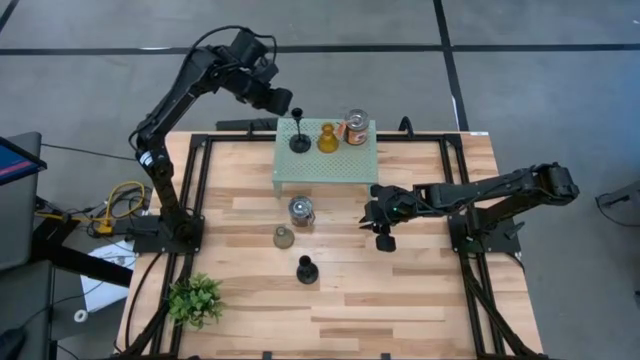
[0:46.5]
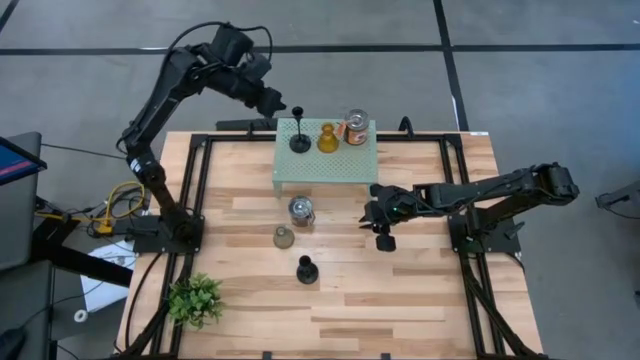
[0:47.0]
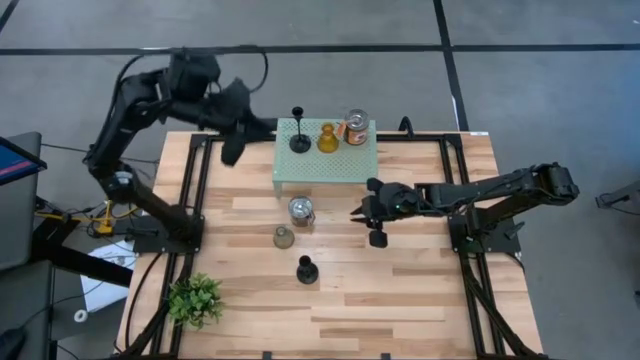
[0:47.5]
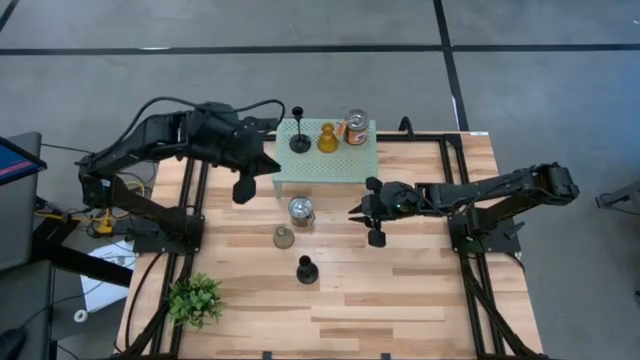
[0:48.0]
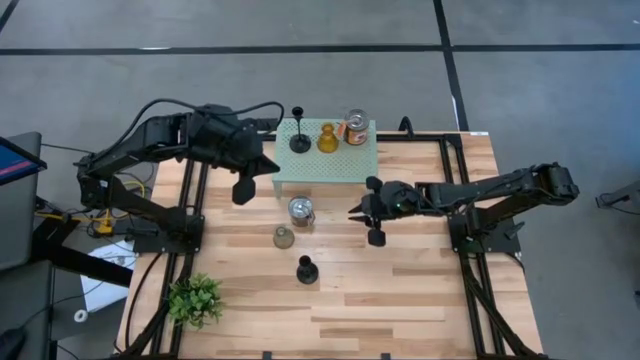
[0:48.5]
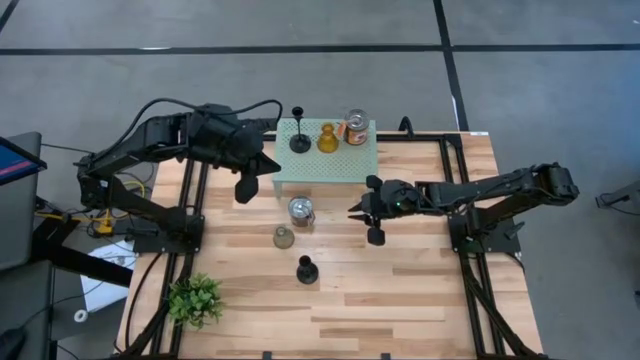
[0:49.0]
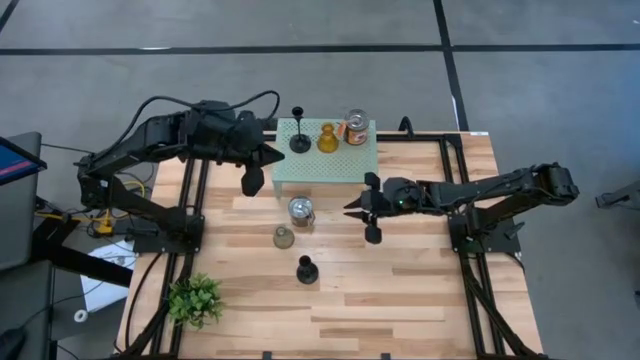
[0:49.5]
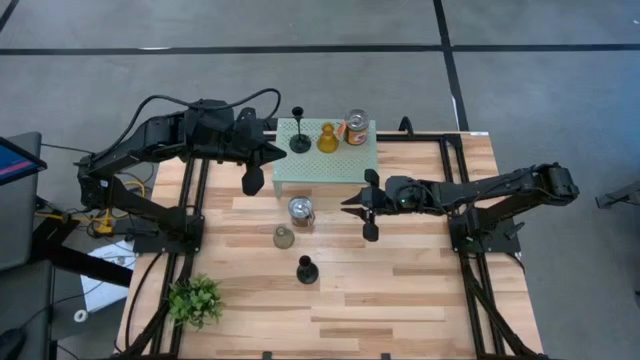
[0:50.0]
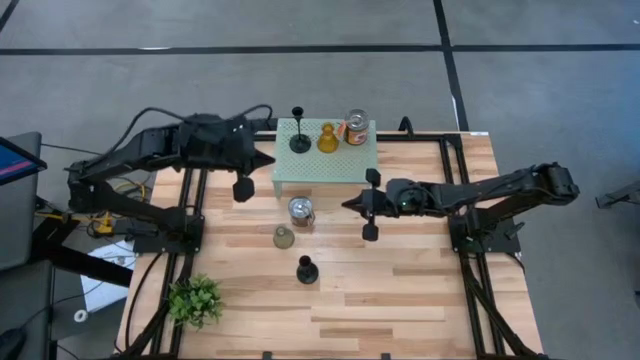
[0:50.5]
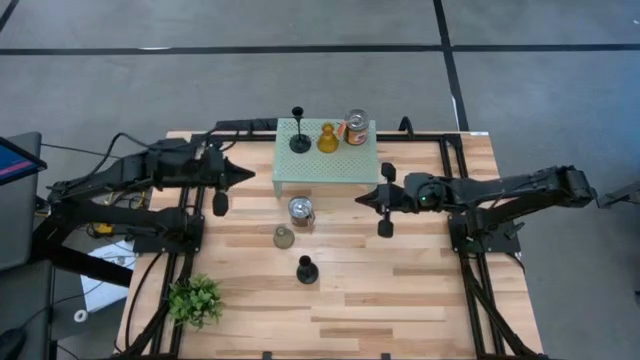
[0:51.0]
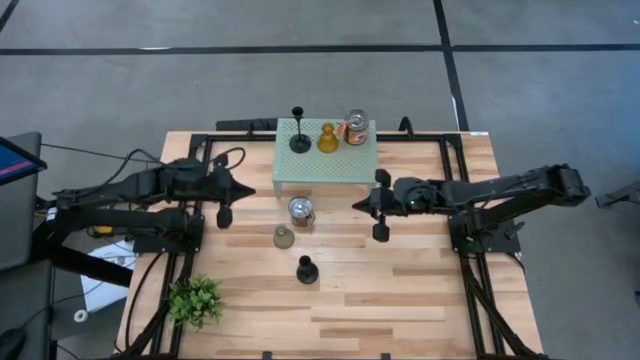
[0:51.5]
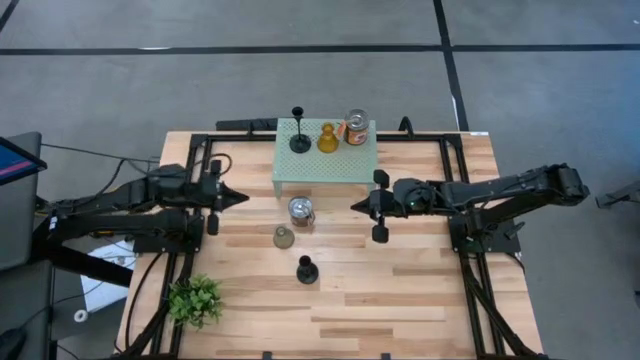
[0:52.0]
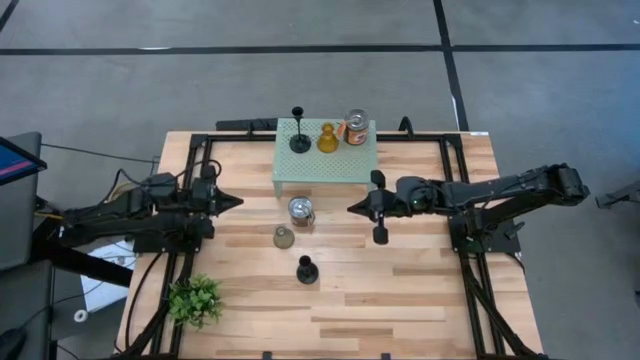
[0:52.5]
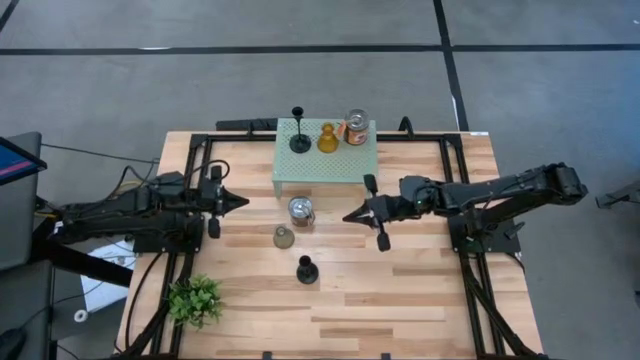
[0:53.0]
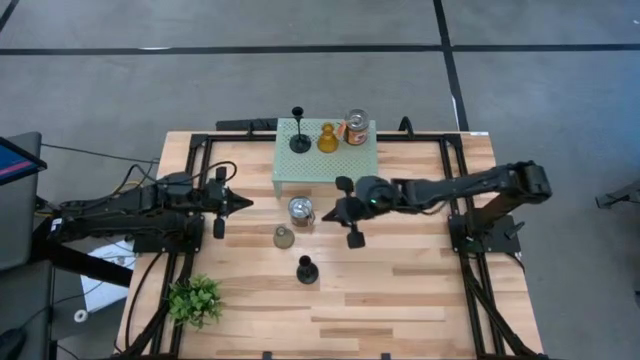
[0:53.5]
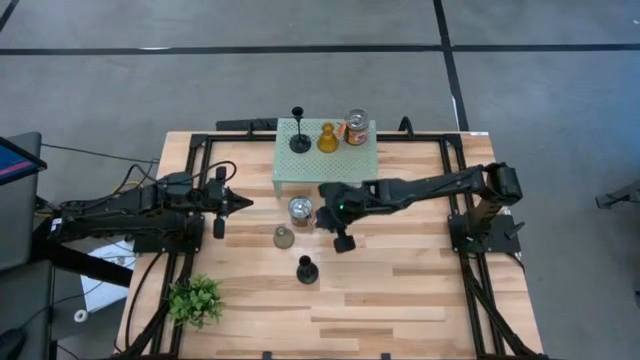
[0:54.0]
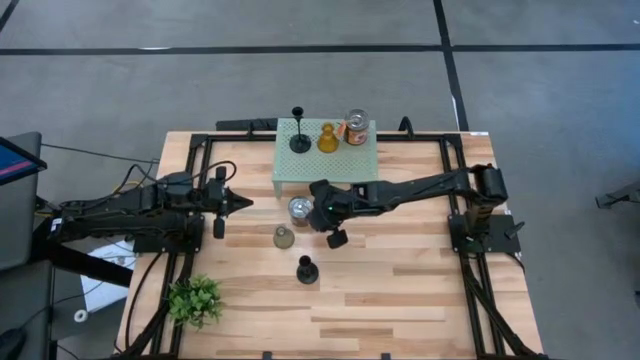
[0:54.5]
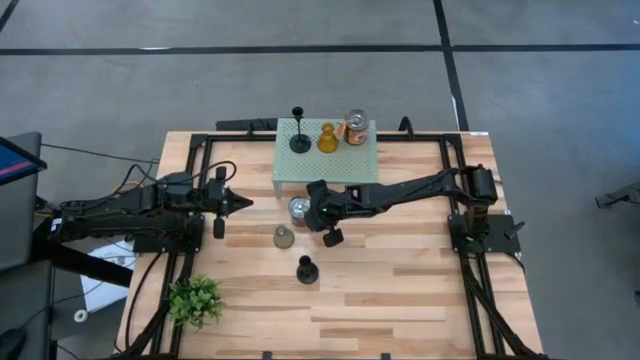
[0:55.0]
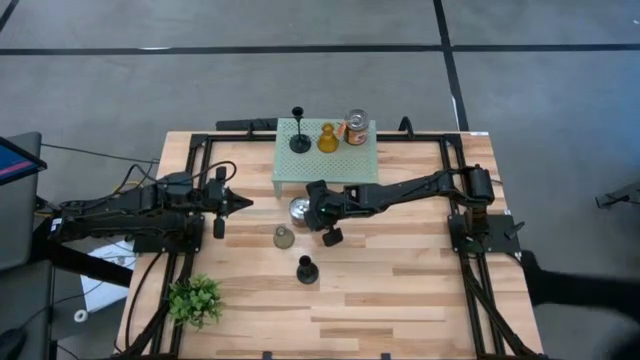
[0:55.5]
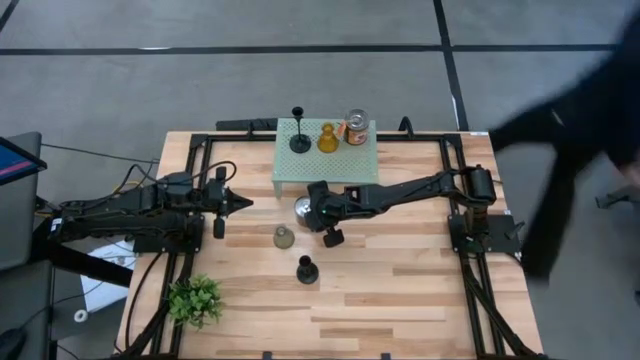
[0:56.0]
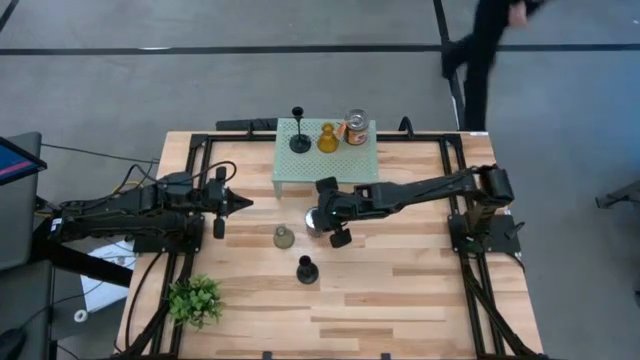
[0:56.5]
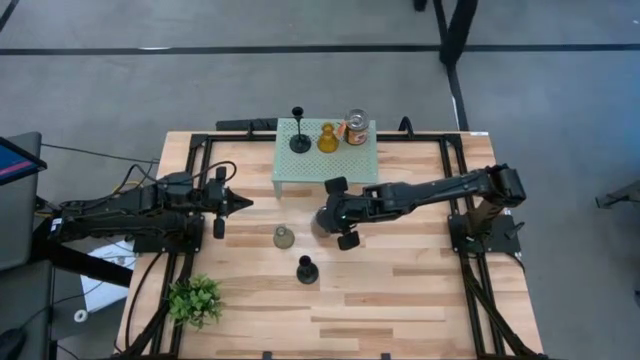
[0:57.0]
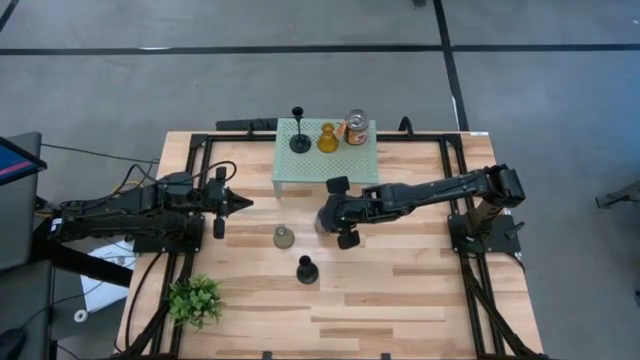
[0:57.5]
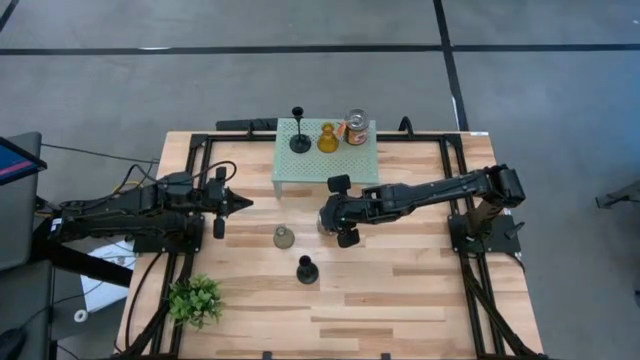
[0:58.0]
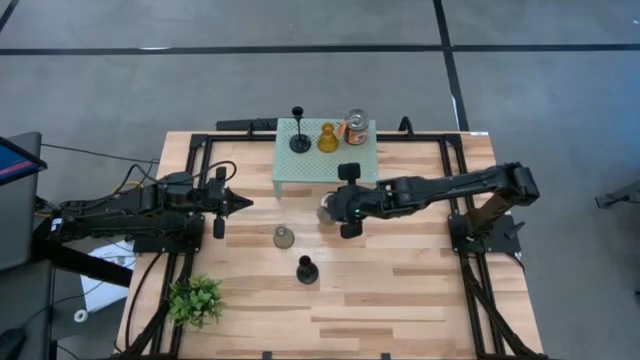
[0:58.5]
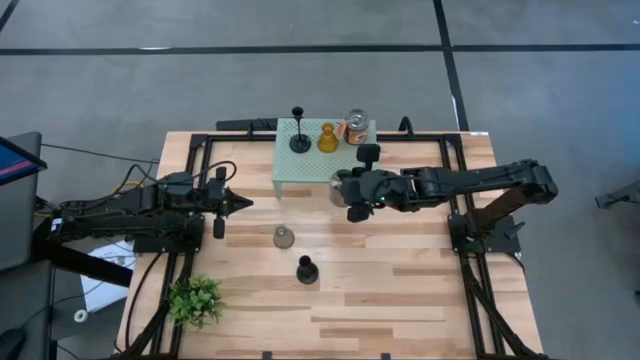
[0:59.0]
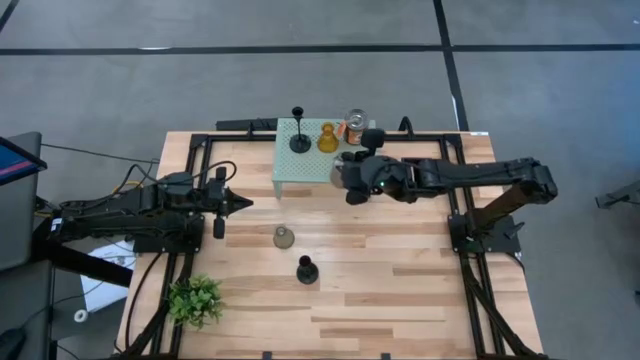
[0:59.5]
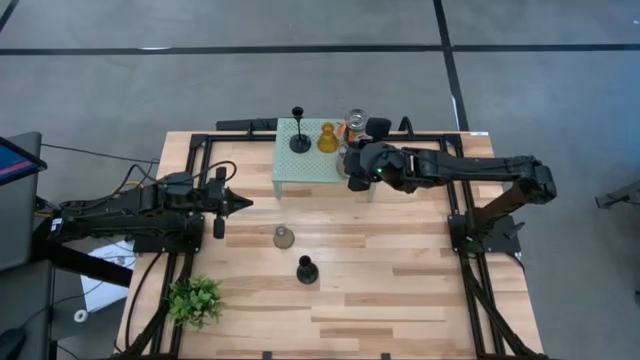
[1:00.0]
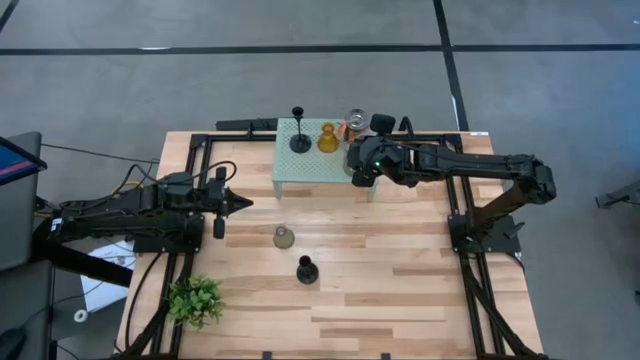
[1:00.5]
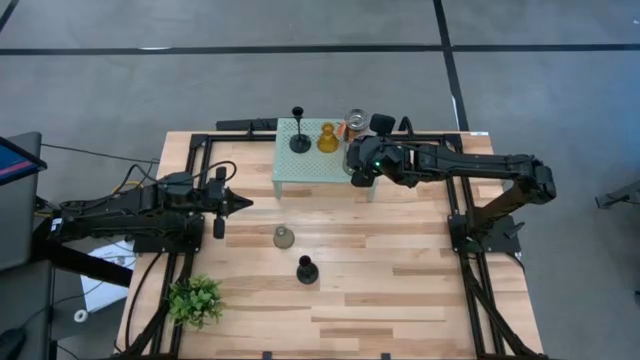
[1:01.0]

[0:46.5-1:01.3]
Task: Pick & Place candle stick holders
Put the scented candle on the shelf aligned with the other scented candle

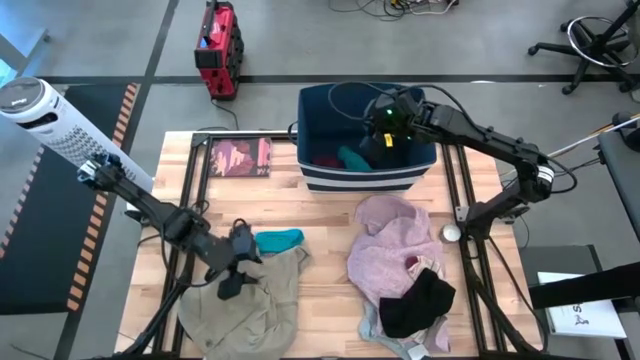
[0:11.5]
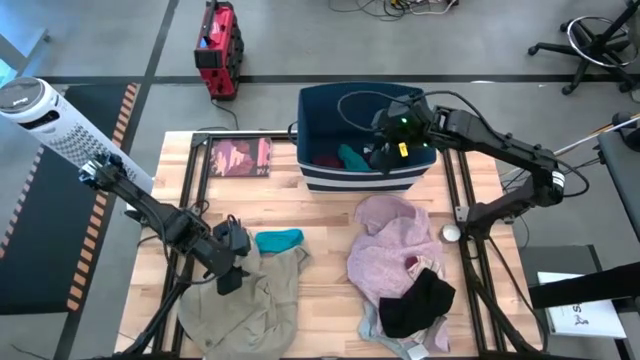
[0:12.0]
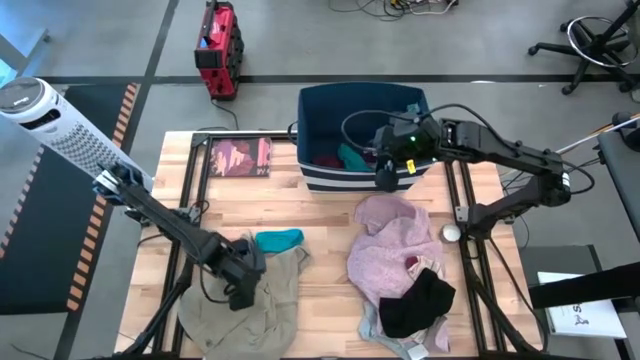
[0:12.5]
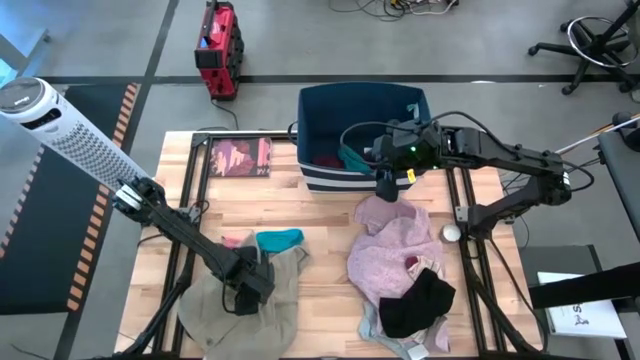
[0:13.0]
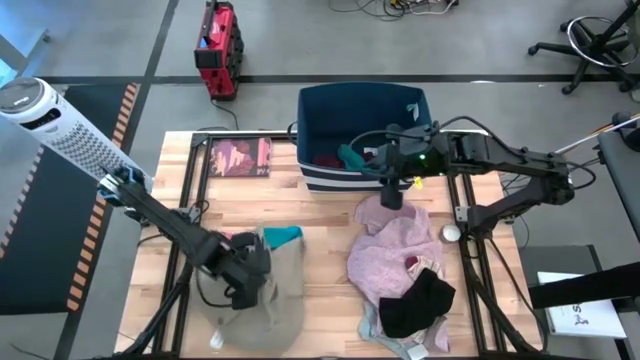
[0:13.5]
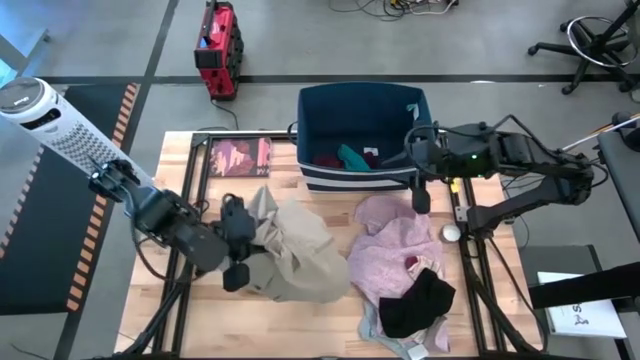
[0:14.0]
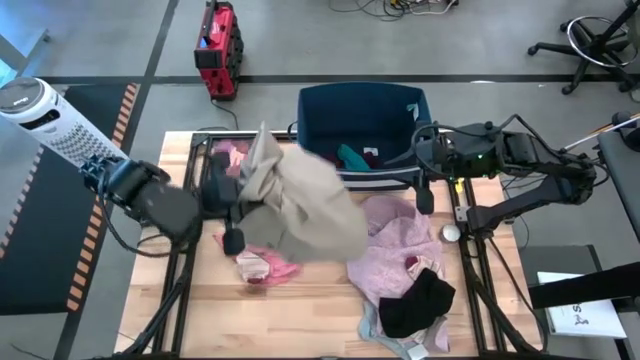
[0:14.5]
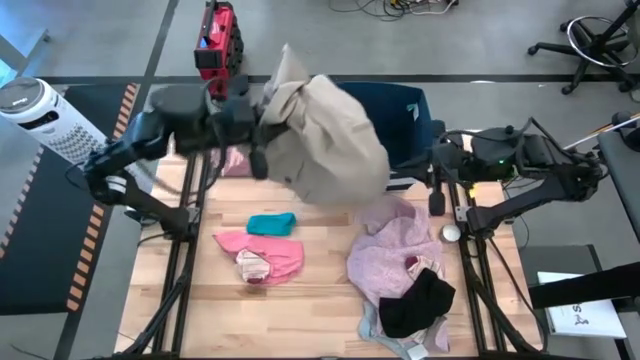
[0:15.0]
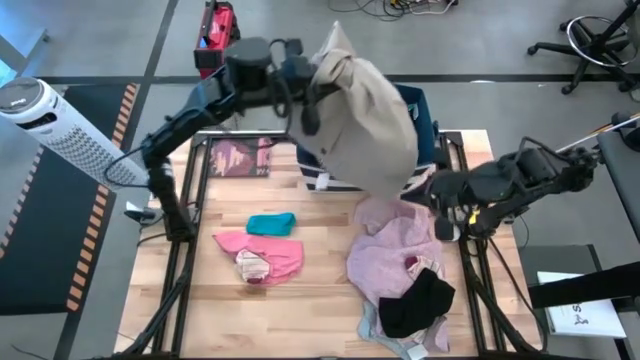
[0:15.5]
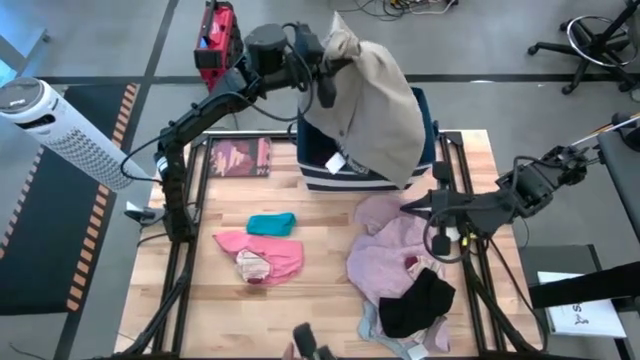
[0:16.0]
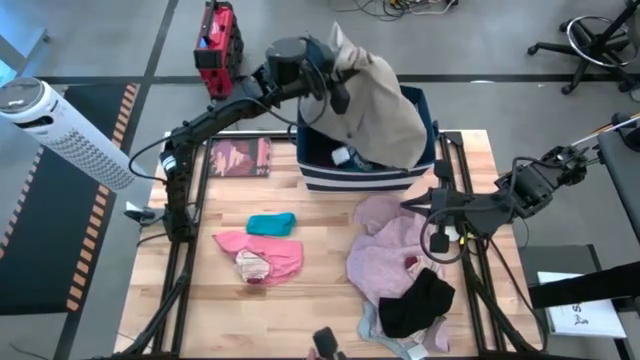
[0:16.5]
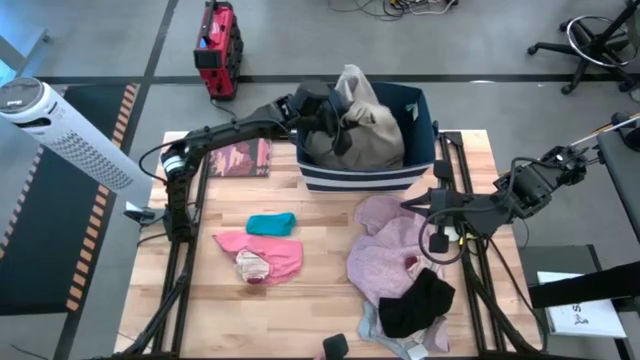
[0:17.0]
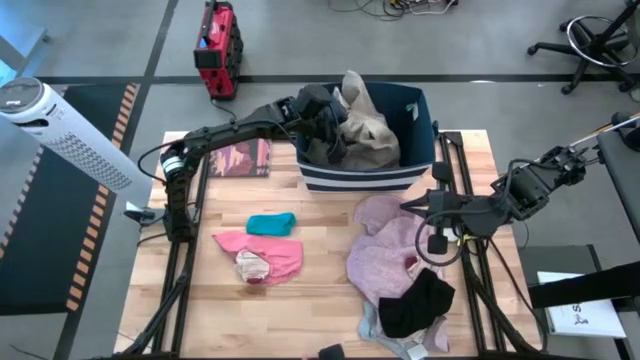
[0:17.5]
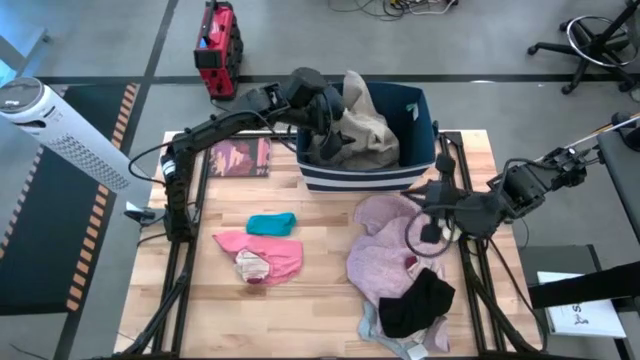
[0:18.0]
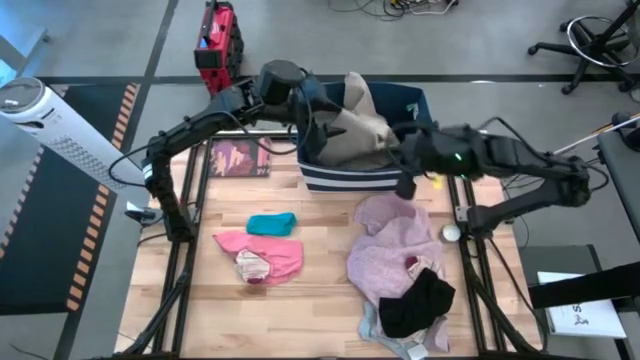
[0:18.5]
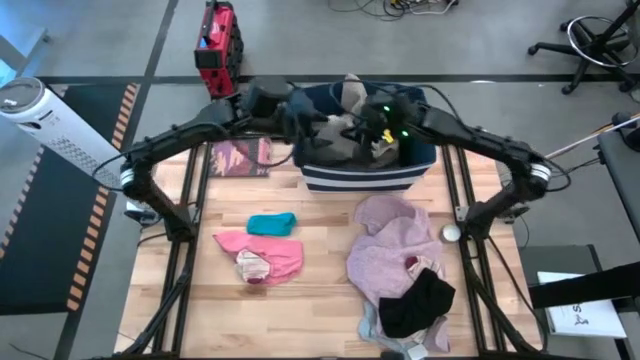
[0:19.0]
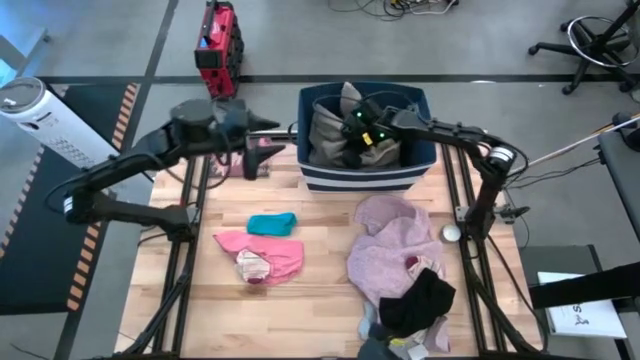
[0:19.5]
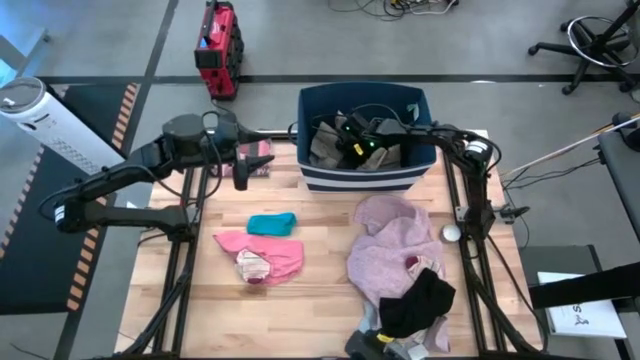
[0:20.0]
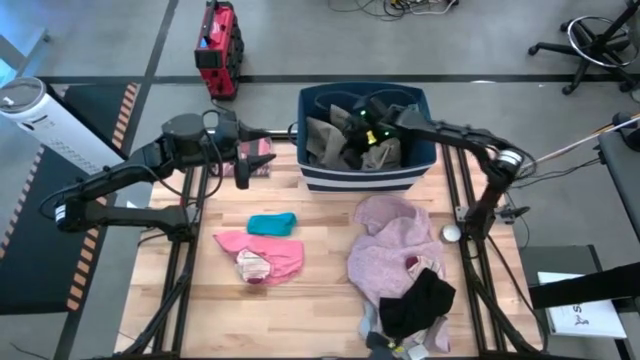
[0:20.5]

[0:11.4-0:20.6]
Task: Sort clothes
Put the brown shorts into the blue laundry bin
